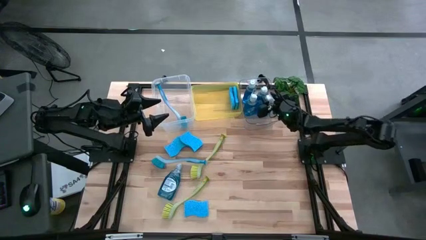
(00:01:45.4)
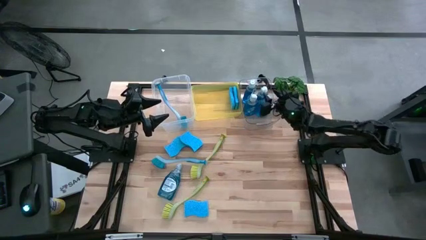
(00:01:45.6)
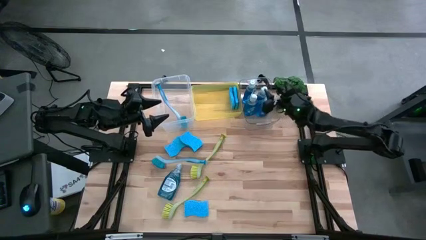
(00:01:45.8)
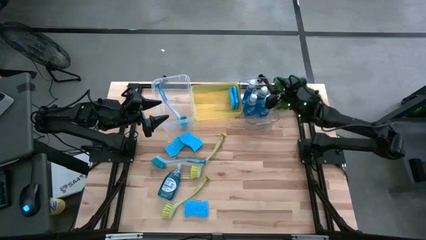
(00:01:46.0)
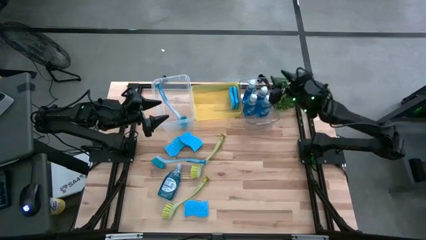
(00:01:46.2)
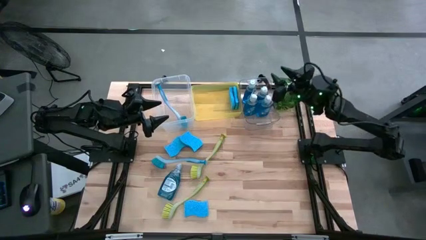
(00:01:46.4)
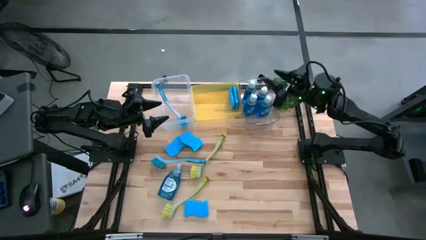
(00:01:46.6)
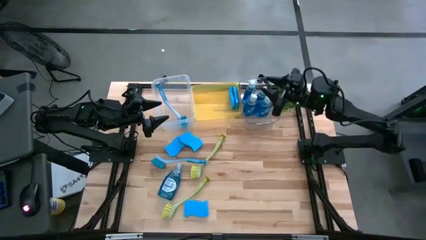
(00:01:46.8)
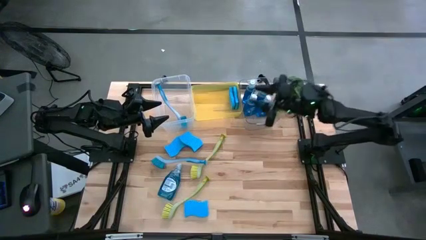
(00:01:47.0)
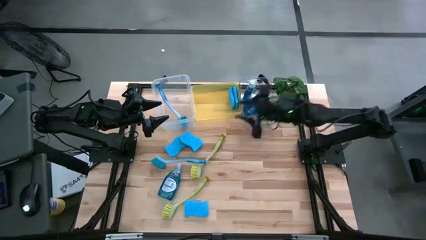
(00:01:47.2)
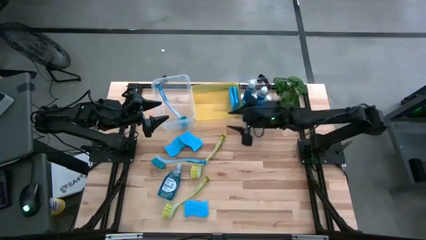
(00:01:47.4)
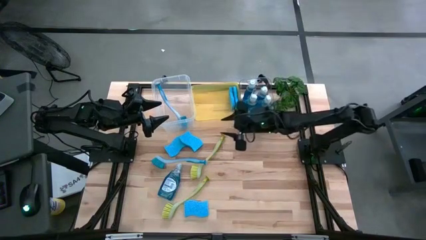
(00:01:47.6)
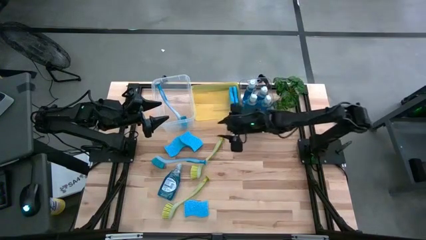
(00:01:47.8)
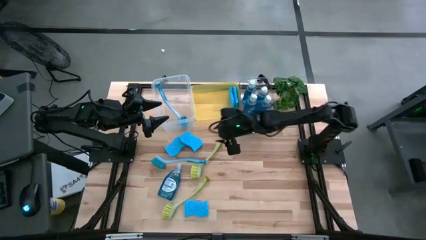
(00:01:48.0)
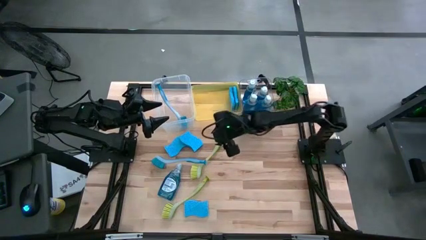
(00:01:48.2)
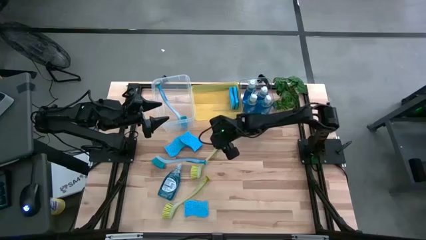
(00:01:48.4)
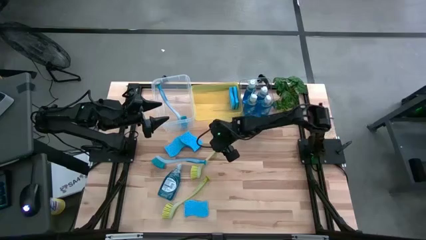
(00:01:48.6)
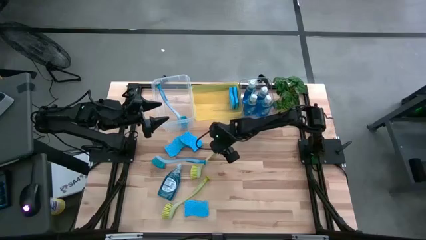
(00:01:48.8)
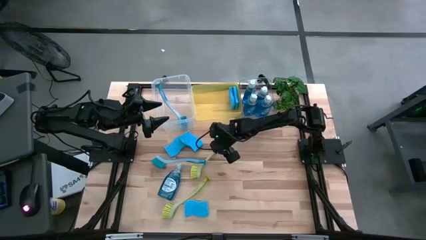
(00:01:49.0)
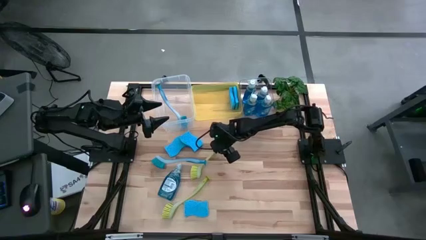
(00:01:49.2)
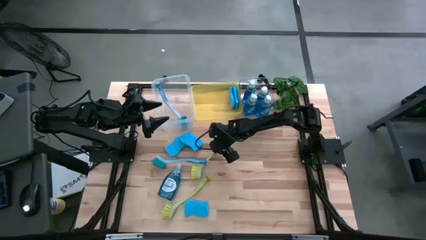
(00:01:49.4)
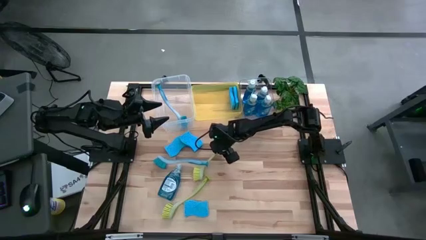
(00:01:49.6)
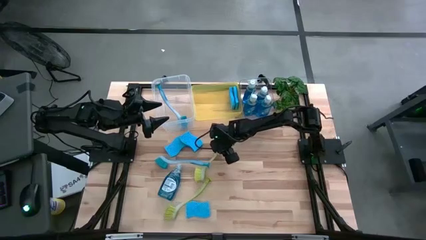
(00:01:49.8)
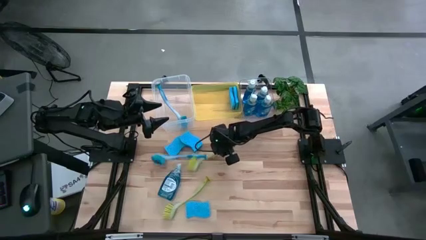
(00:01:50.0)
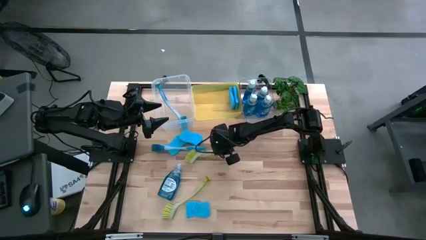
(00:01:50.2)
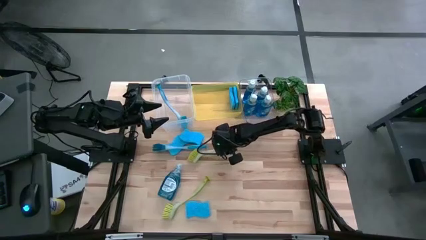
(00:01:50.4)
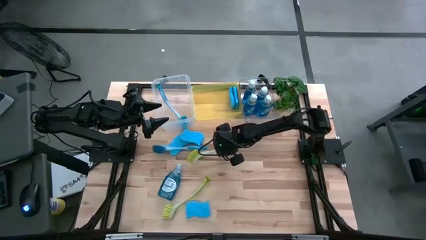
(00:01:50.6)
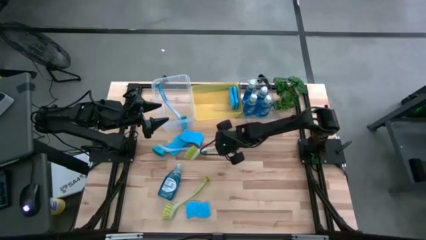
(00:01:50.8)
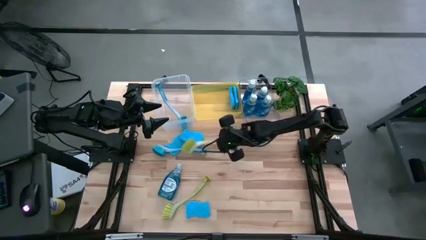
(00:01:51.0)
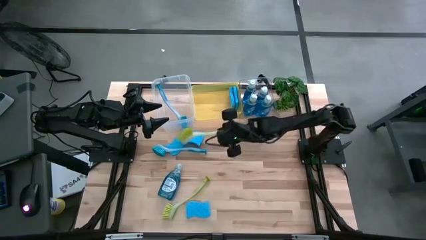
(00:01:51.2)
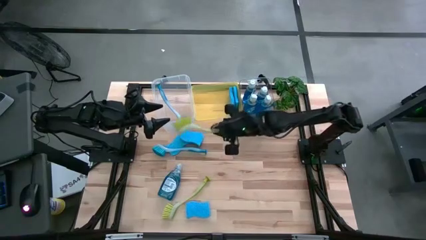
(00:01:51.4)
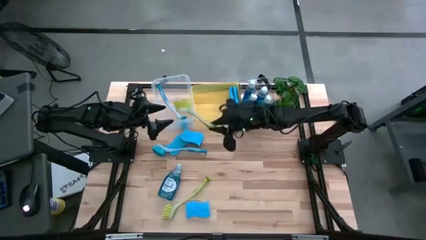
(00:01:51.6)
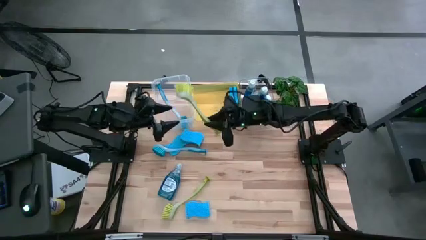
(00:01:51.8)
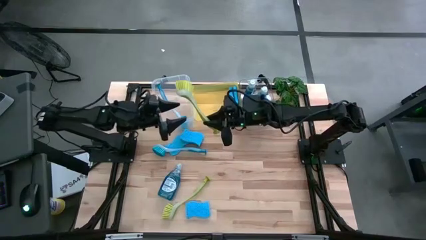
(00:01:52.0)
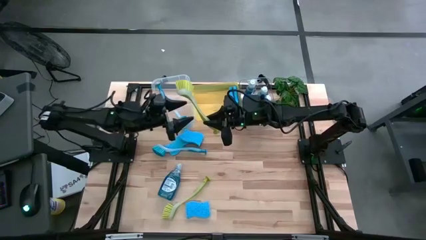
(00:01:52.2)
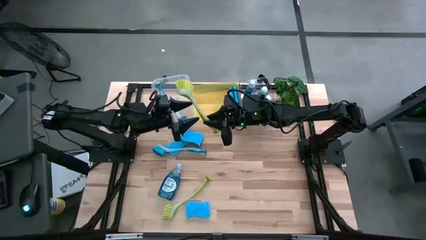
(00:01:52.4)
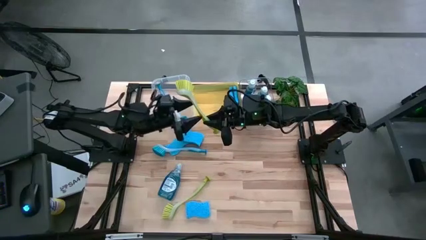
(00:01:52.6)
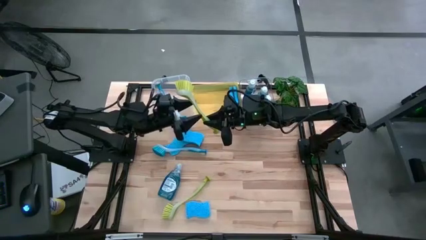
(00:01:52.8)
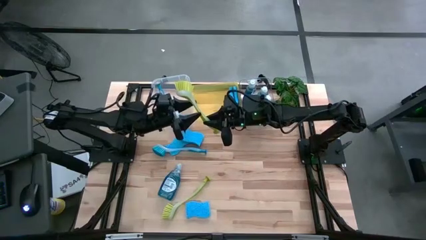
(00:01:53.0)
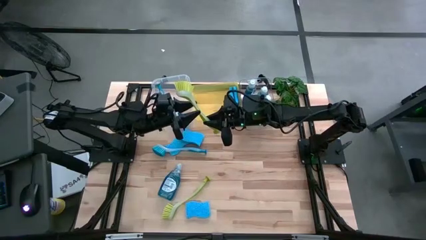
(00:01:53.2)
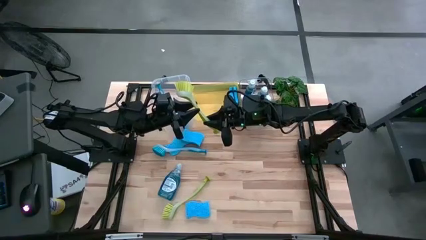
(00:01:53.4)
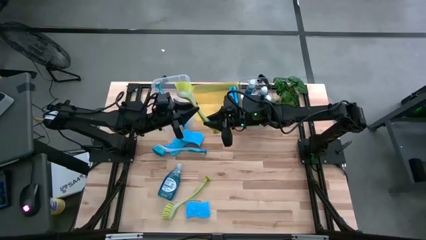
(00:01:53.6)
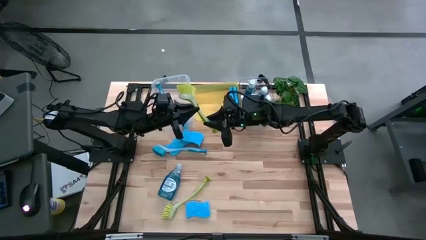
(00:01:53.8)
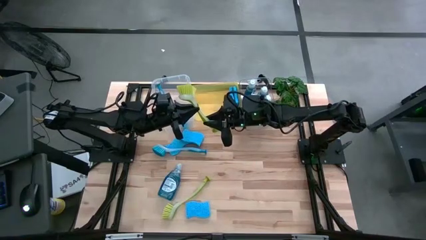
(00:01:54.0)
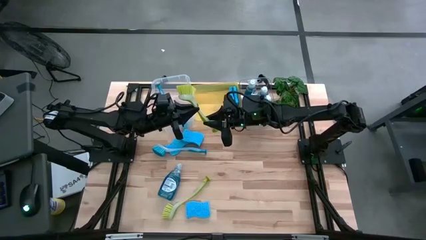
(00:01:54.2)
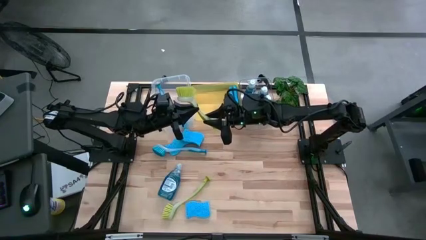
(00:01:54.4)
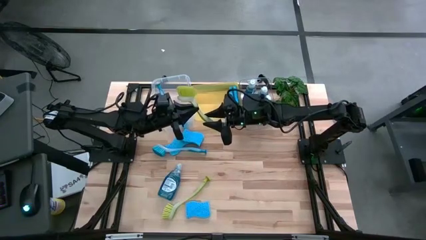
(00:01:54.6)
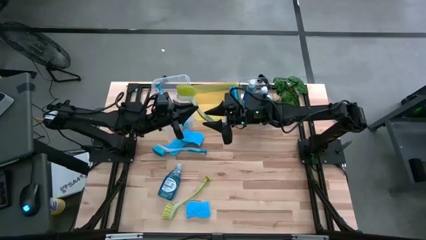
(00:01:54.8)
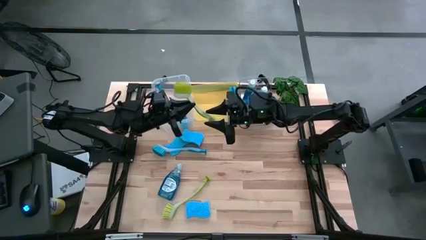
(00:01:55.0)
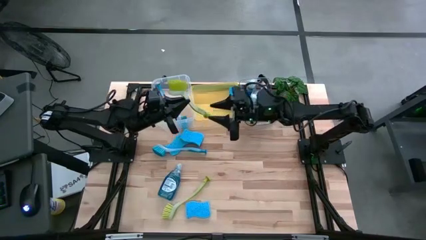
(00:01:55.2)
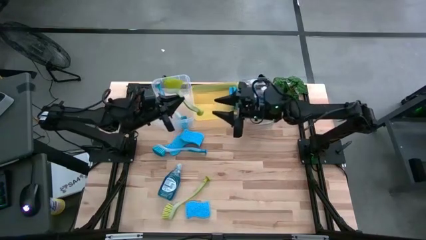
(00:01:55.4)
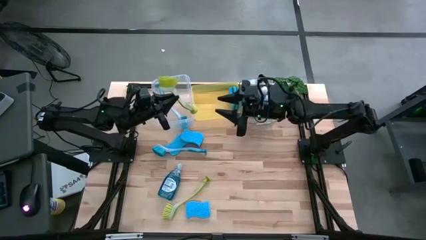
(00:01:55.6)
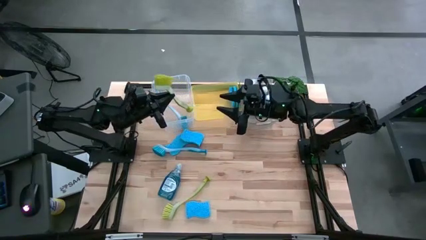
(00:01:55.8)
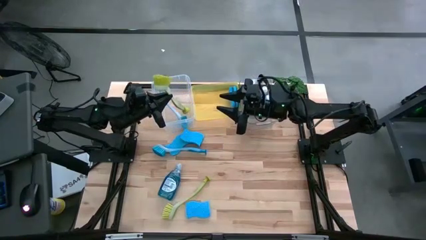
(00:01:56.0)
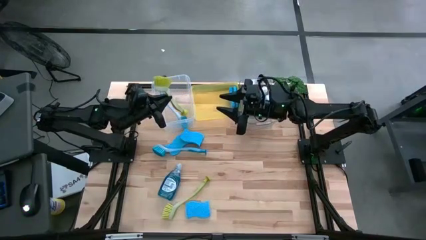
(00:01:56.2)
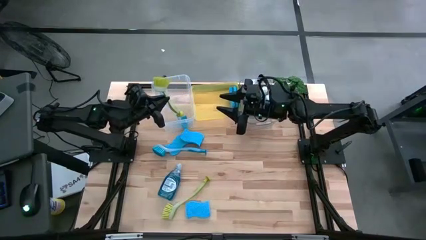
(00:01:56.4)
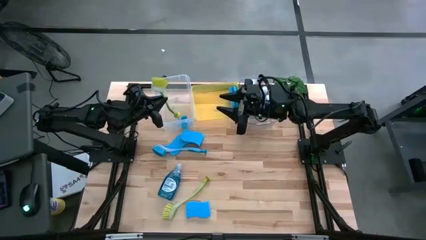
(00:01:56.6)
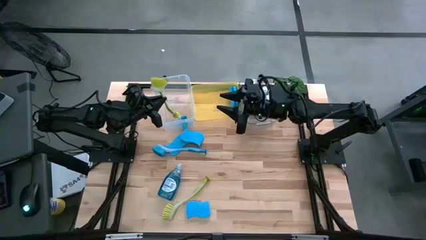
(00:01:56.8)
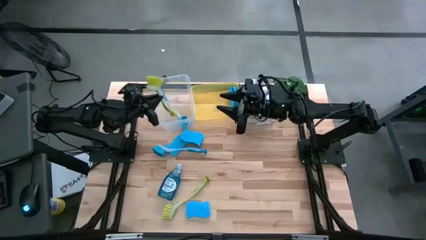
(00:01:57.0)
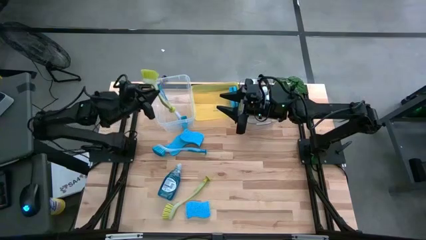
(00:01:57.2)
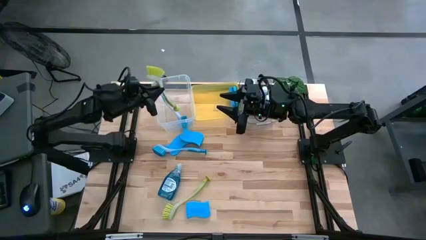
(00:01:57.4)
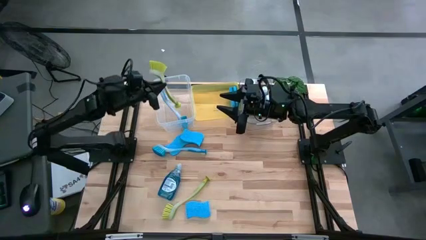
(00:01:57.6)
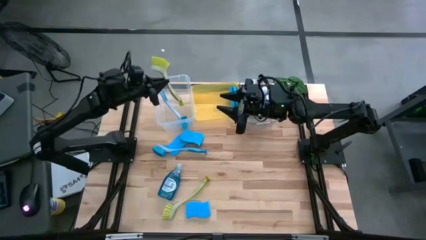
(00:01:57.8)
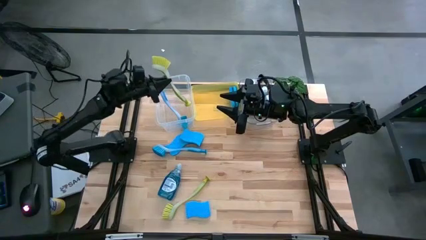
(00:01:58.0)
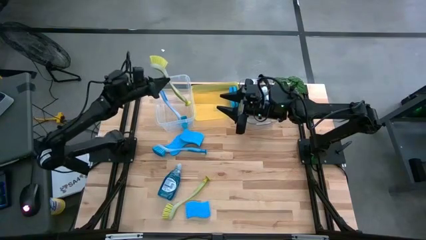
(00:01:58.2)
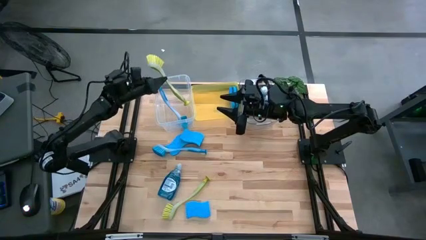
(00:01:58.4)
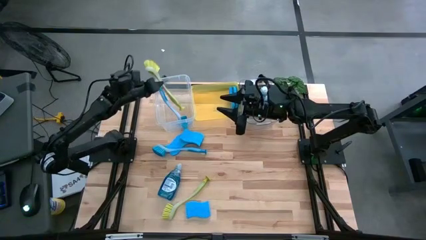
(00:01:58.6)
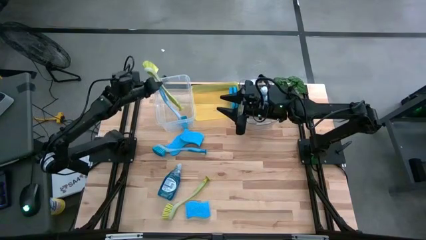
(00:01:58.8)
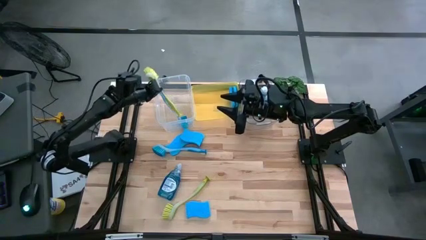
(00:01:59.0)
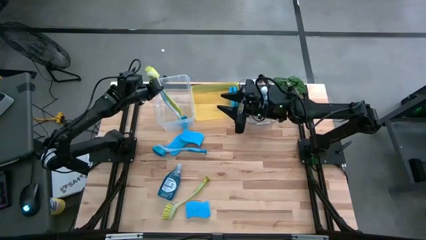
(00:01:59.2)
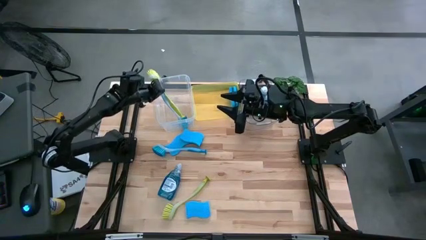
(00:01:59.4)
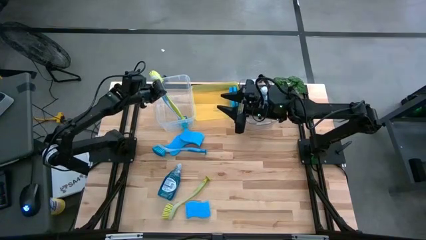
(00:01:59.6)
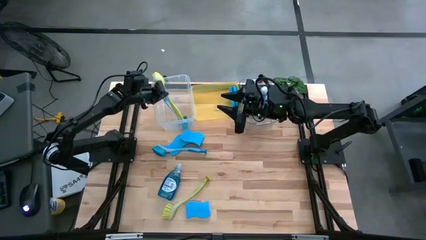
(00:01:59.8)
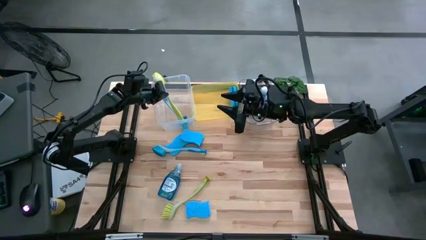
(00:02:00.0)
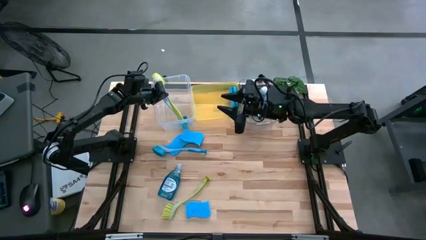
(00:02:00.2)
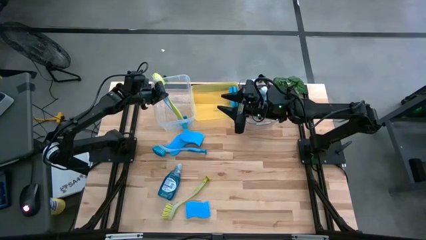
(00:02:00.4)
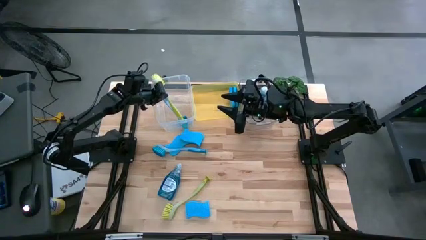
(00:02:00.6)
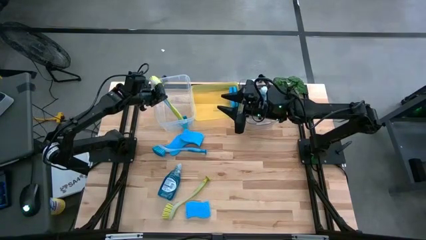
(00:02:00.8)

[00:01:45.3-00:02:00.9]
Task: Pick & Place Kitchen Sink Supplies
Put the yellow dish brush into the white bin

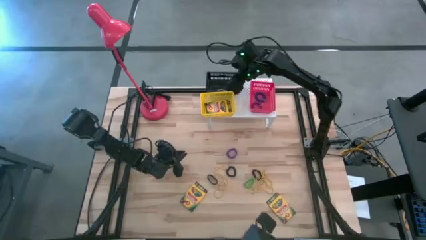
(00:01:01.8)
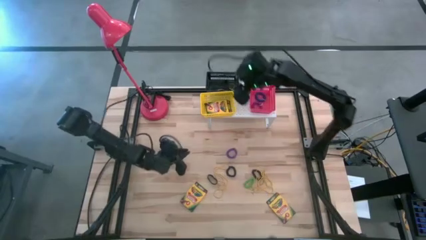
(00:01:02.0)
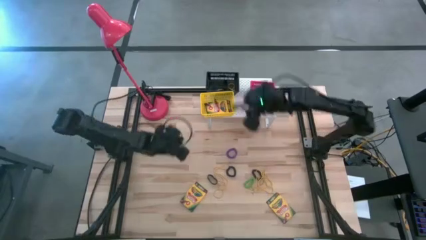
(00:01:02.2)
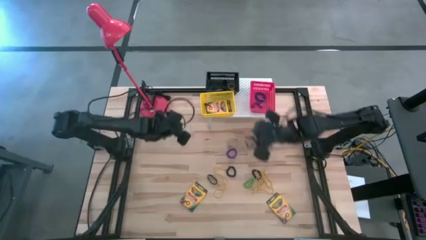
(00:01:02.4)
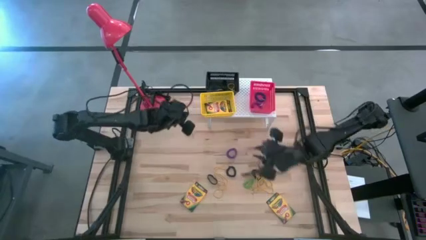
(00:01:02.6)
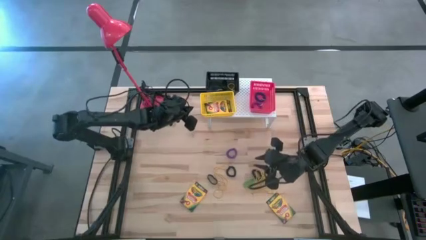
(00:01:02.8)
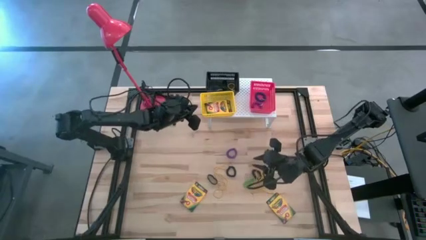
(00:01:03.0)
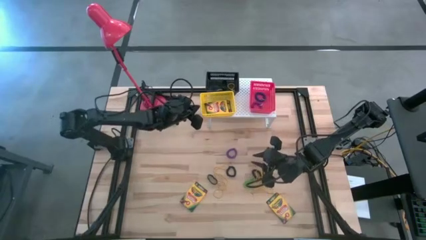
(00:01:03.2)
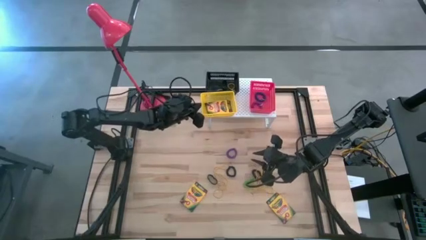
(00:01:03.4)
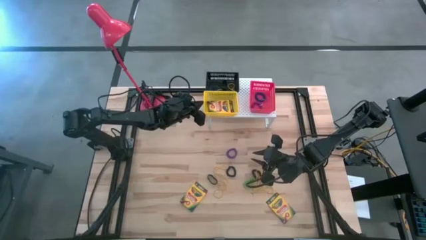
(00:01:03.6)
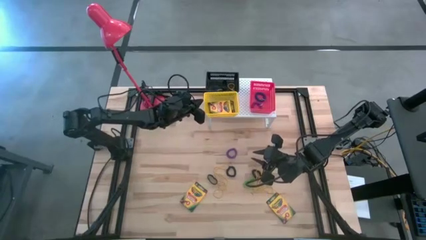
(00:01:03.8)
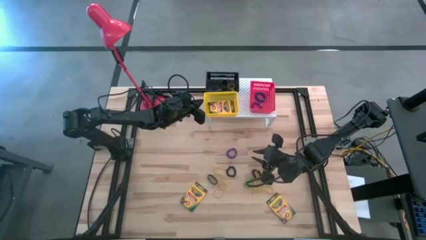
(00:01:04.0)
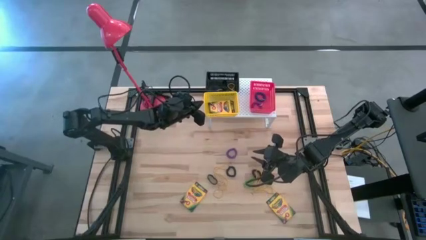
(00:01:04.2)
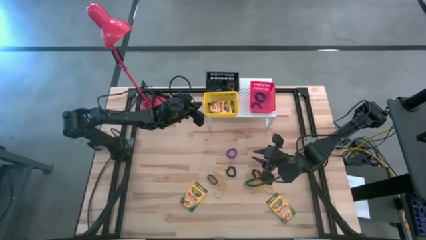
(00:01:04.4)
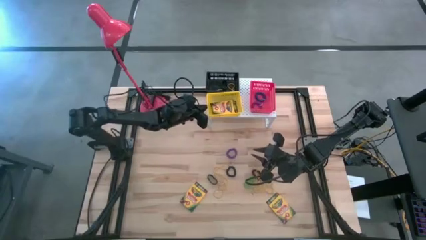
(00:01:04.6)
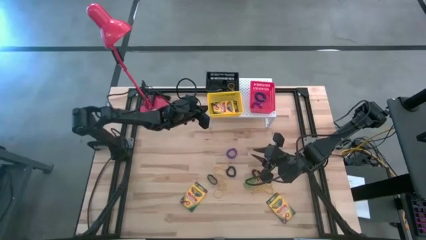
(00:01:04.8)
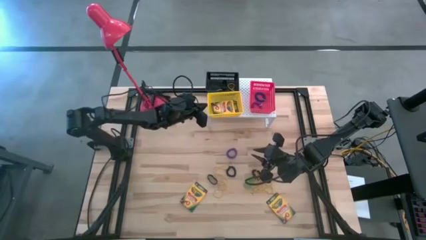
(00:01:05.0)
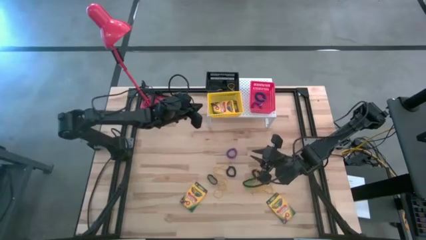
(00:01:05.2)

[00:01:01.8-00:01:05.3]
Task: Pick & Place Office Desk Supplies
Adjust the yellow bin on the shelf
